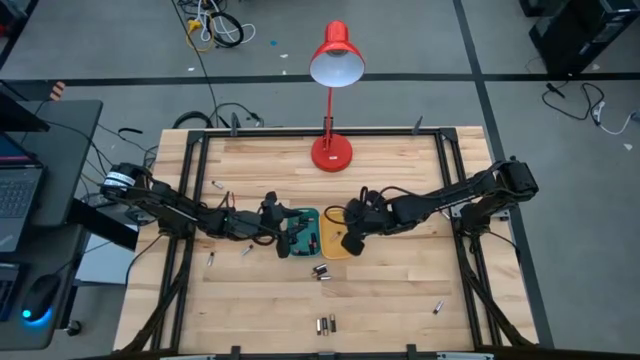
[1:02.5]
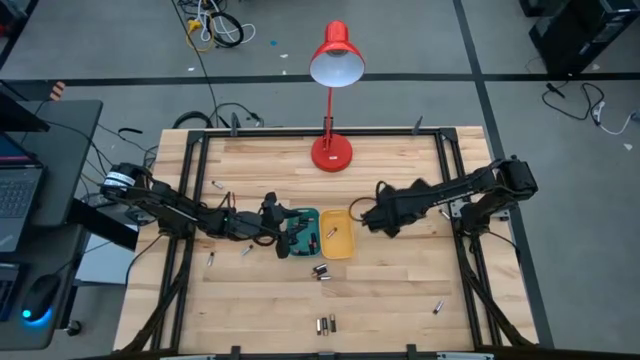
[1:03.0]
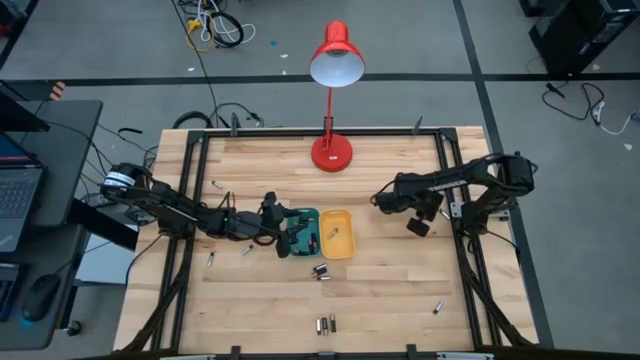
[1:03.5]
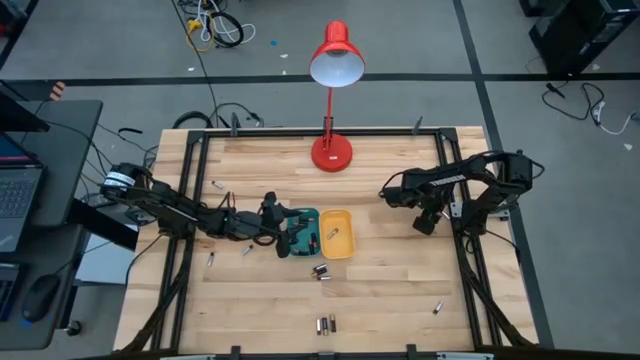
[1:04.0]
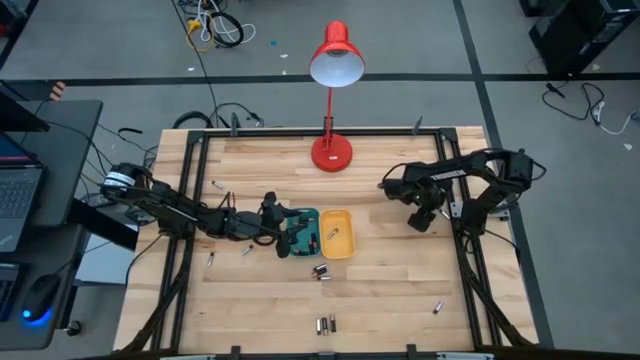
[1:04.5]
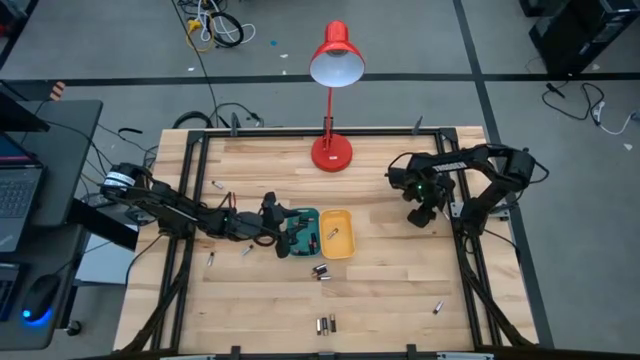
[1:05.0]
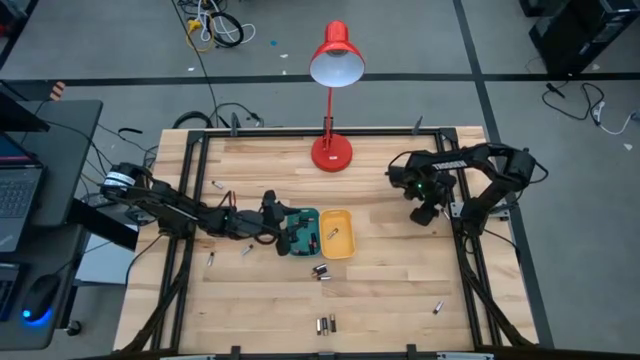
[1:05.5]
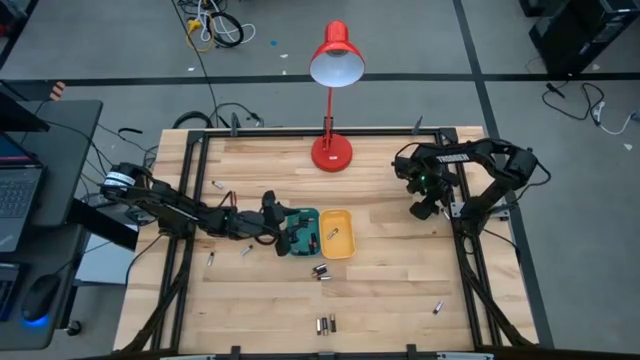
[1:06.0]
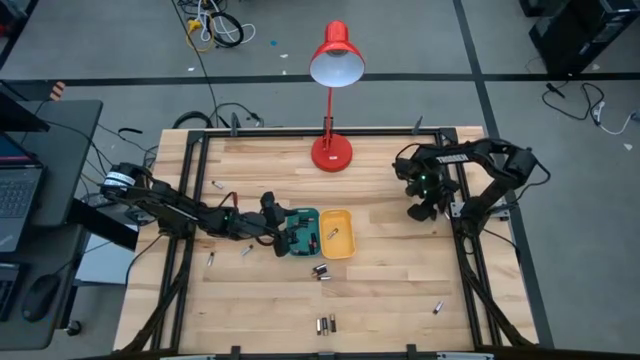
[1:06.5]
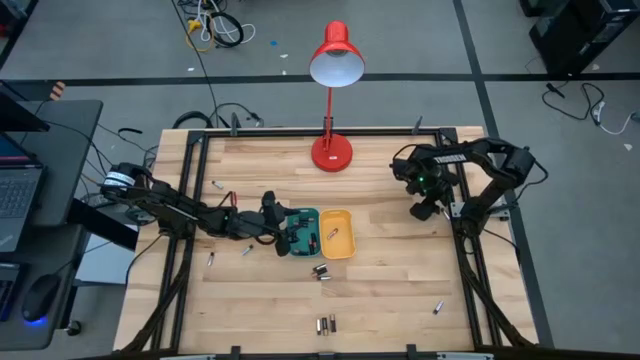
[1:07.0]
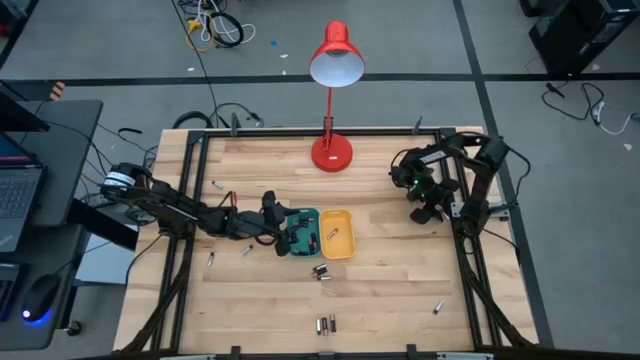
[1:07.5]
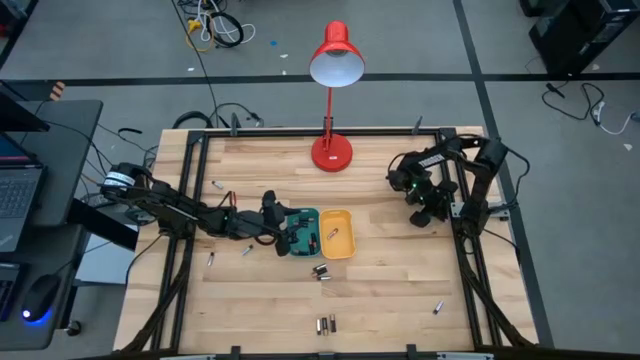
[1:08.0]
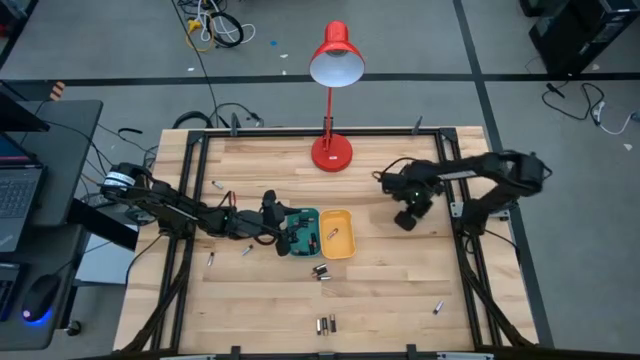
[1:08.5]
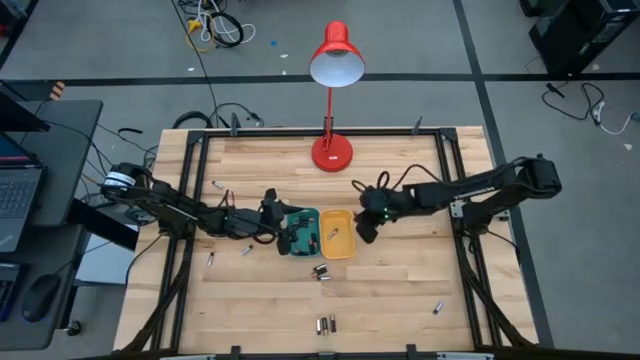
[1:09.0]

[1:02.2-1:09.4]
Task: Sort batteries
Put the white battery into the yellow bin

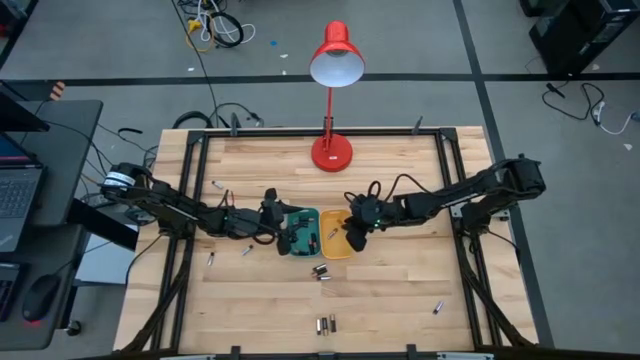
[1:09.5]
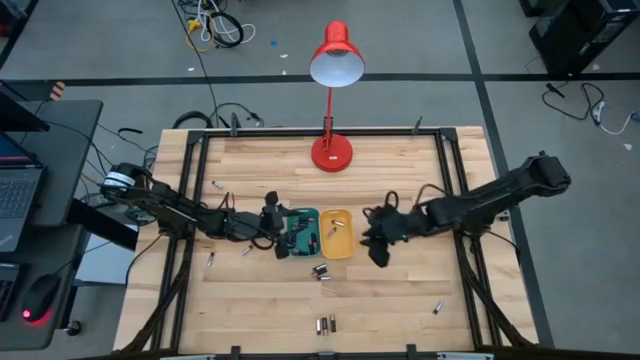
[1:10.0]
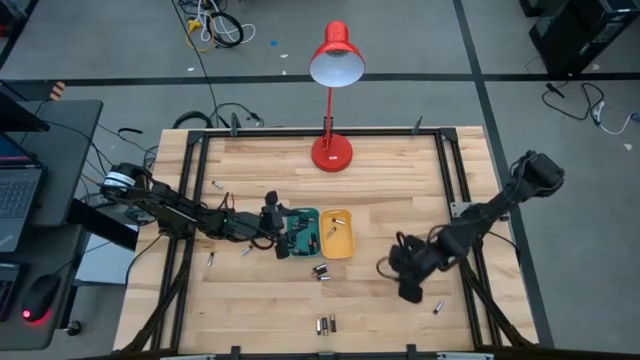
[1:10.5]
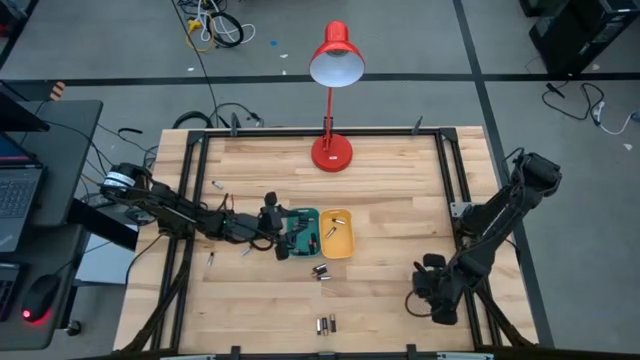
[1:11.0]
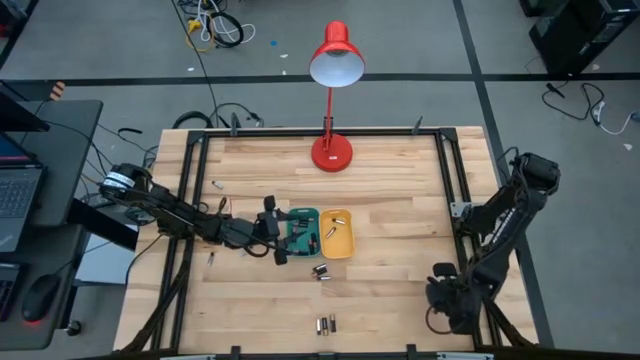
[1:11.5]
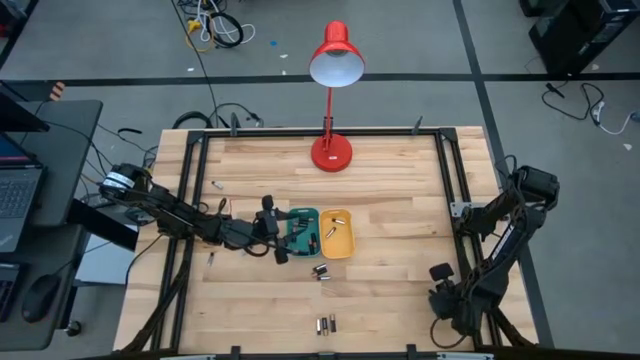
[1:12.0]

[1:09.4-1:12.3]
Put the white battery into the yellow bin

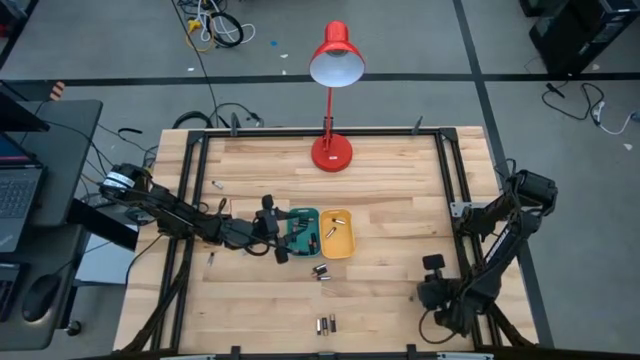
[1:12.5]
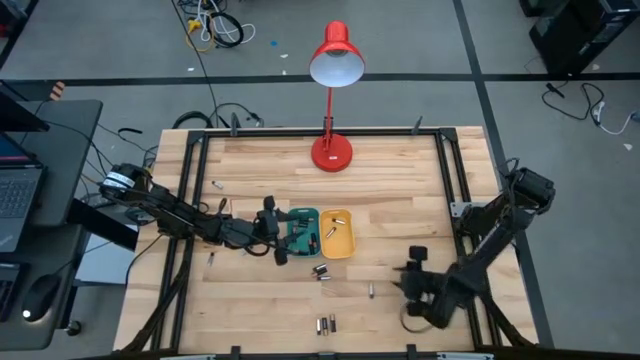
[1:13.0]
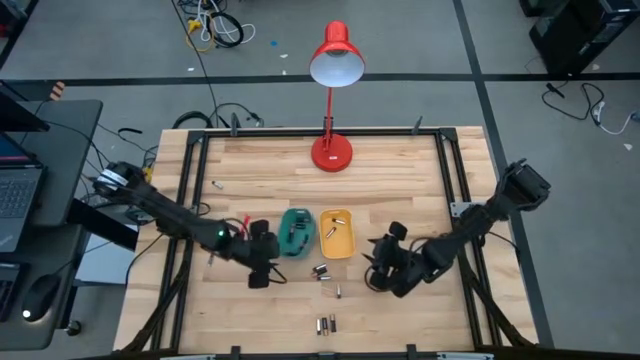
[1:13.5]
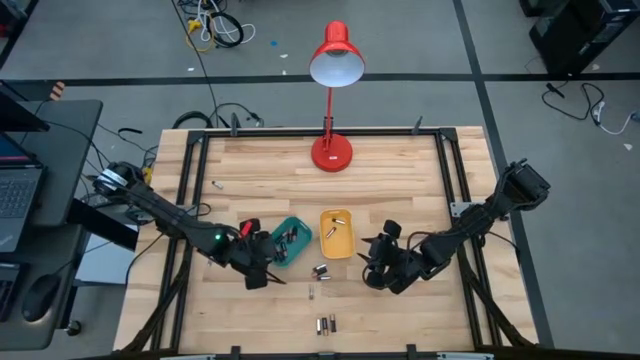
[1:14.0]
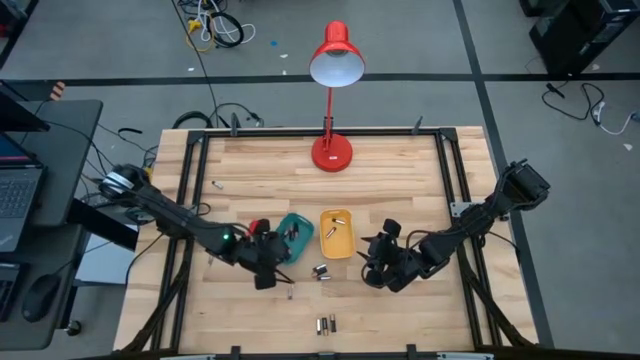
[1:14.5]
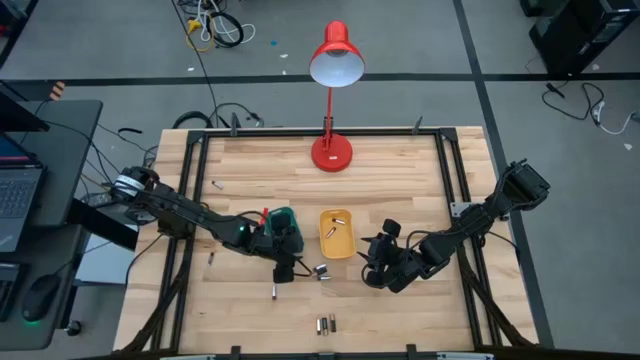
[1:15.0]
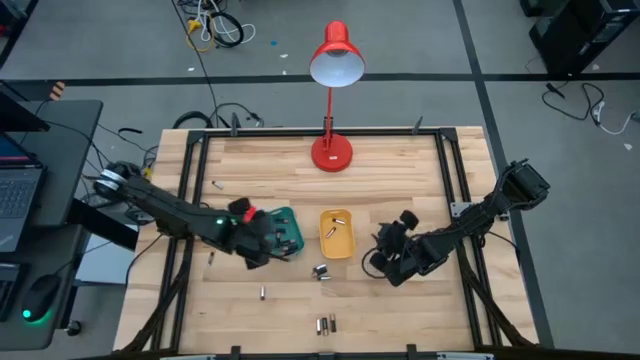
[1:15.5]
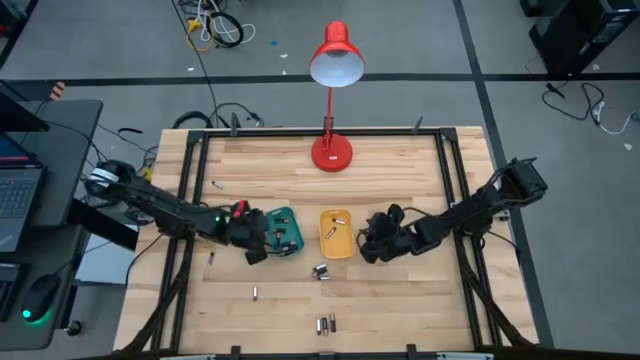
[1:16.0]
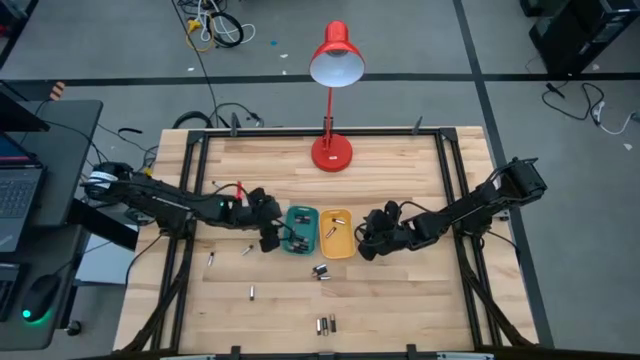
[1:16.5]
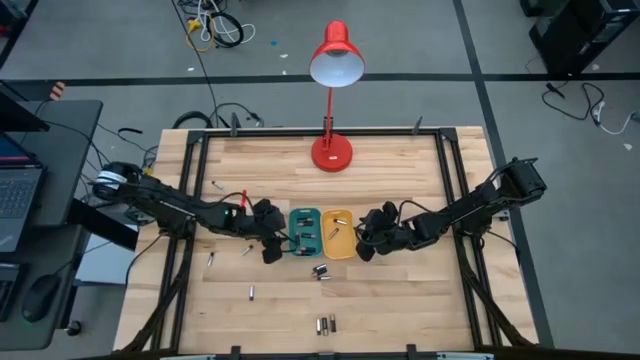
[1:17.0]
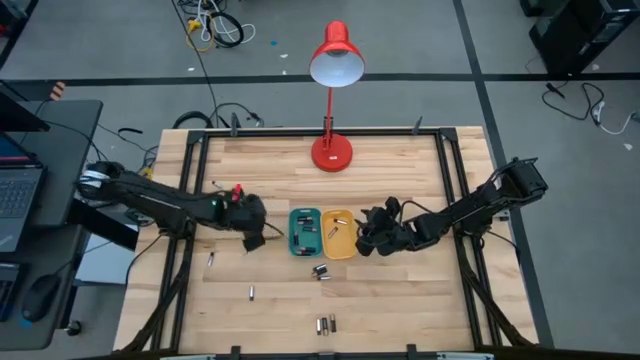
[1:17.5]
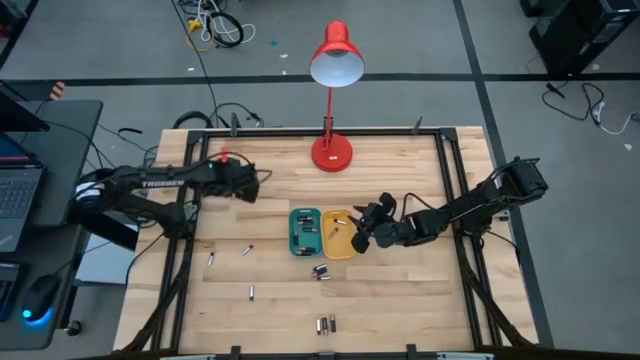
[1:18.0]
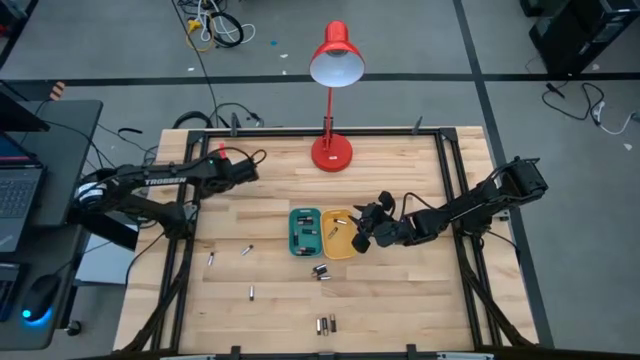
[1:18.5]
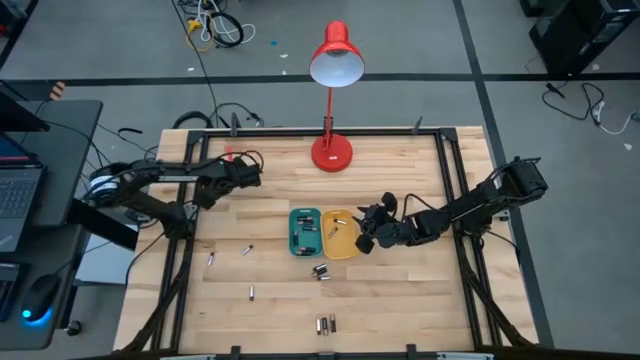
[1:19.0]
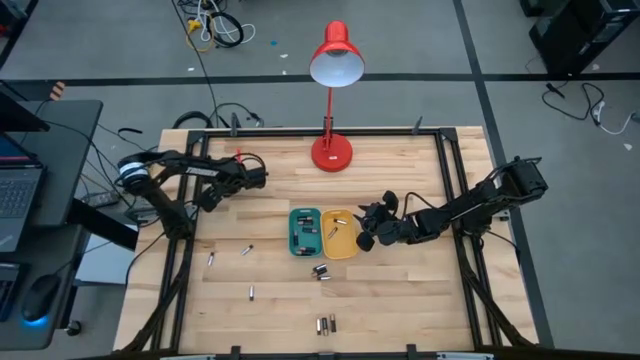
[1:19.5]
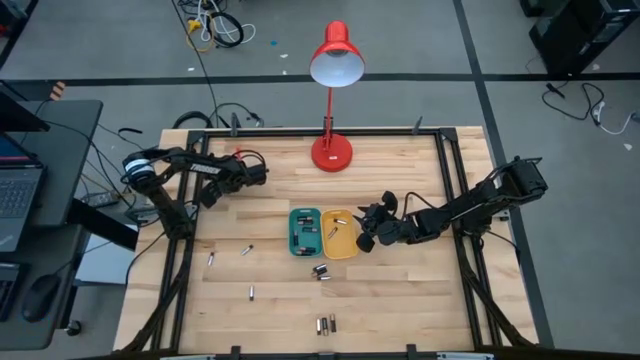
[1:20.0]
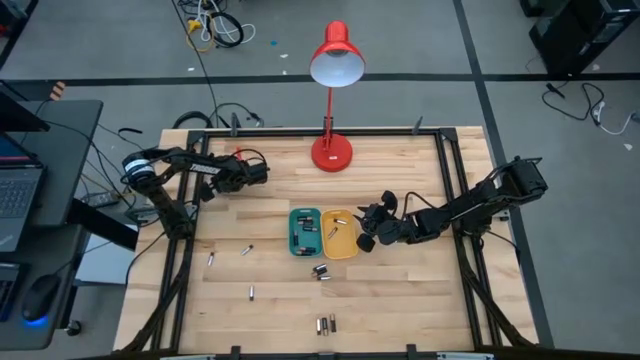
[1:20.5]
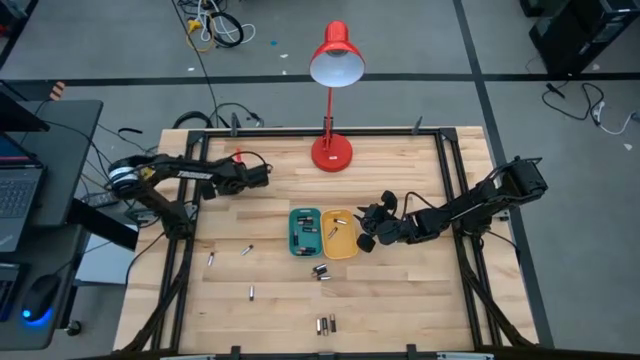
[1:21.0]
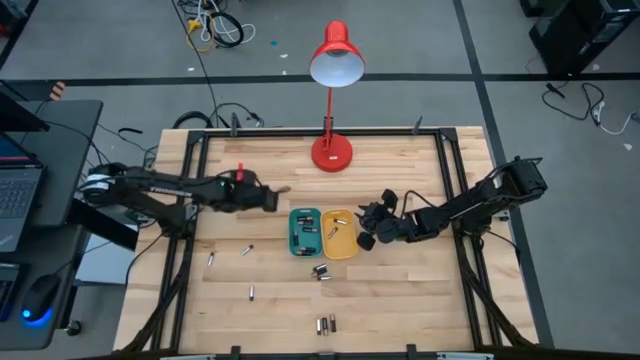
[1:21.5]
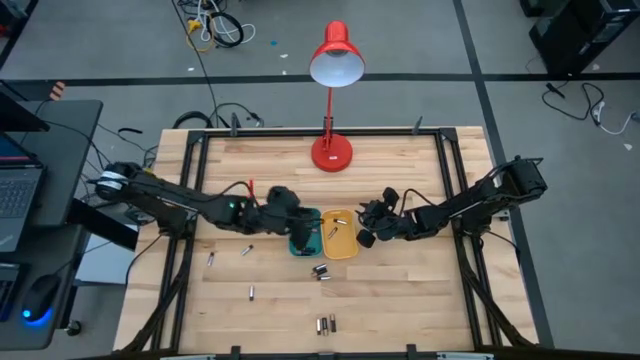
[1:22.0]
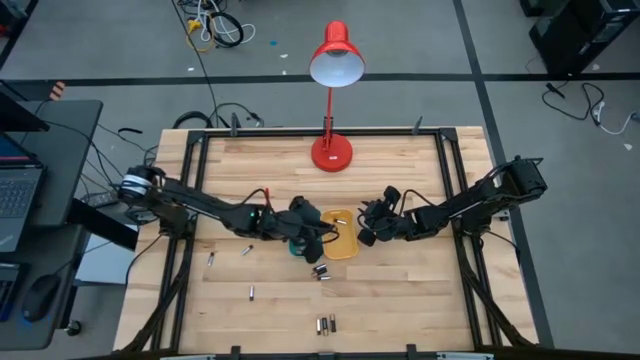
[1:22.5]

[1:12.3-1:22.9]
Put the white battery into the yellow bin
